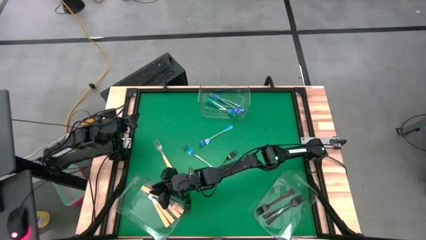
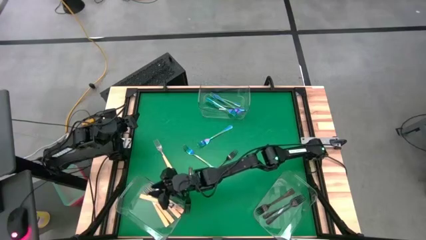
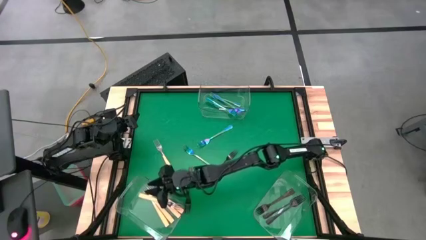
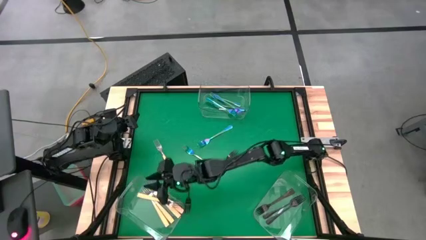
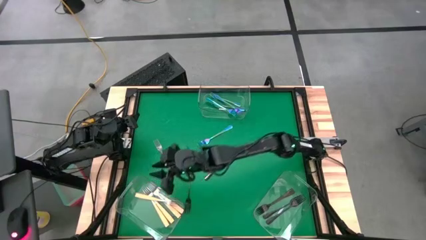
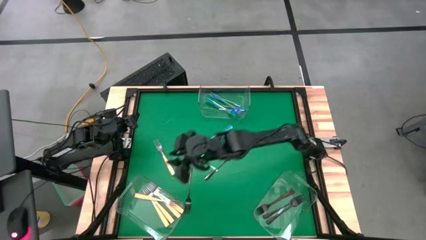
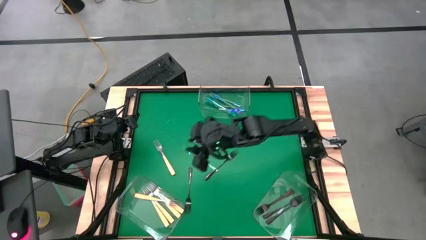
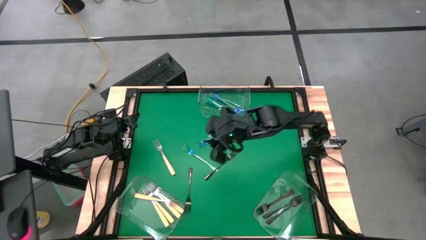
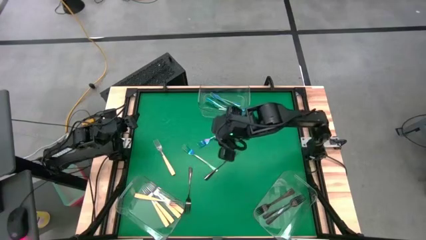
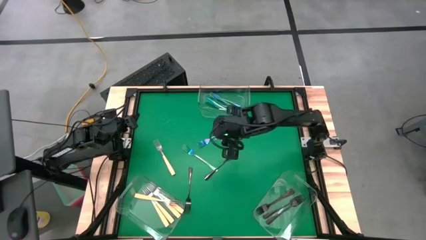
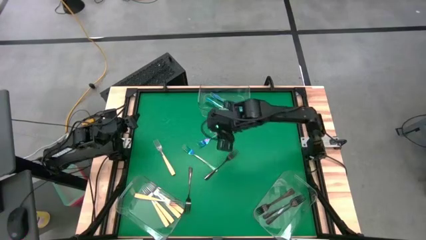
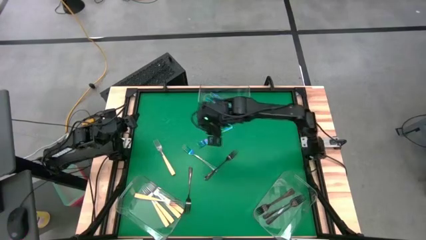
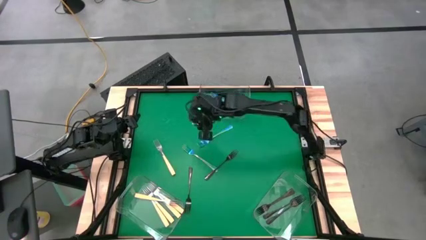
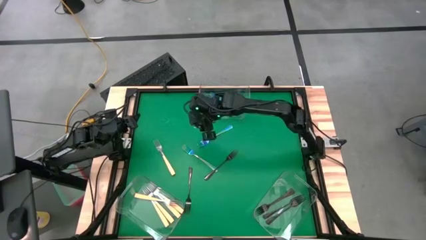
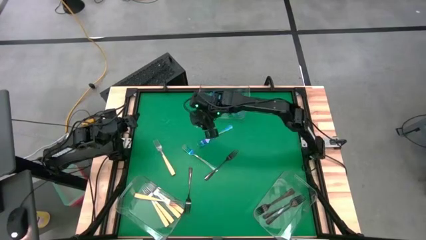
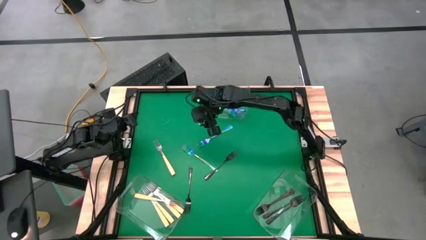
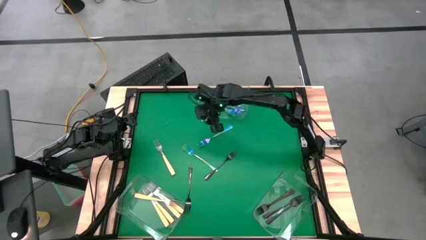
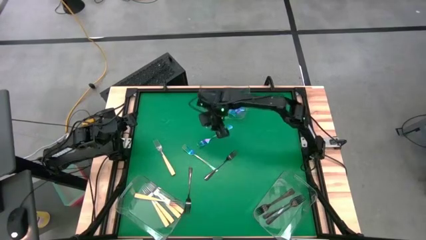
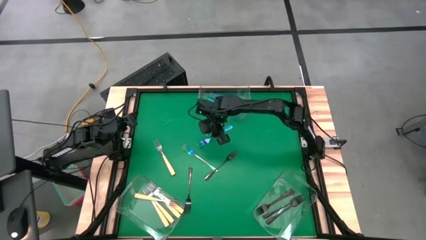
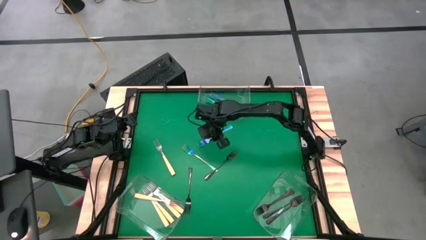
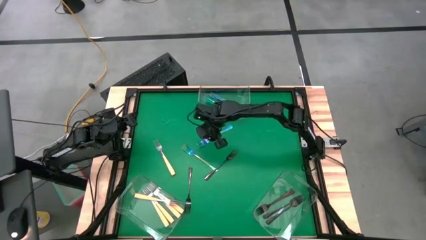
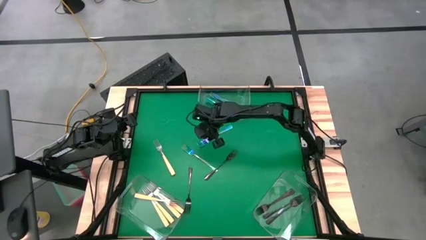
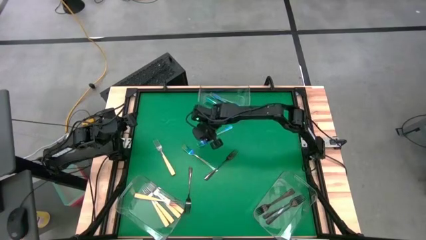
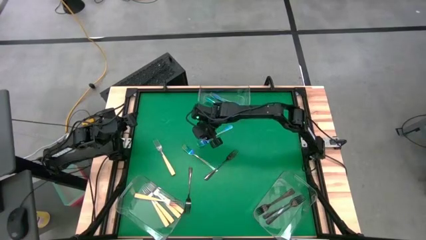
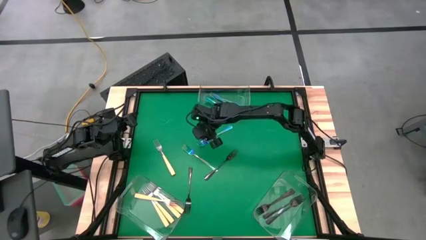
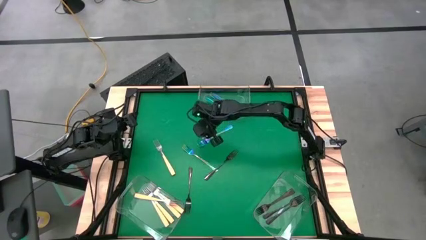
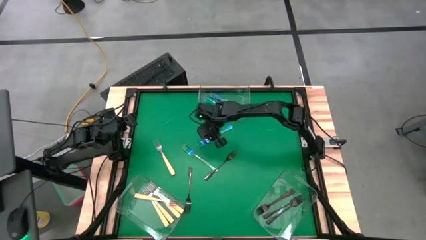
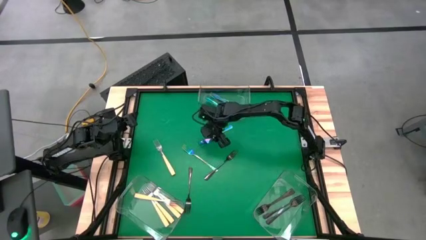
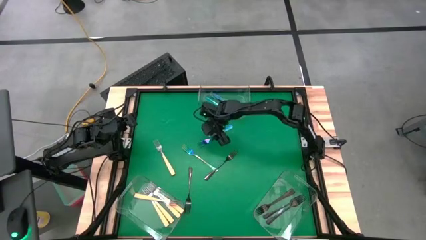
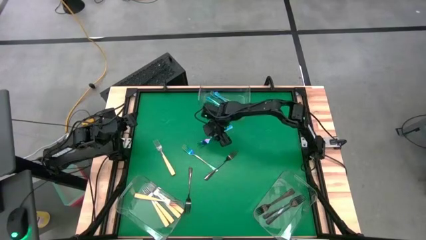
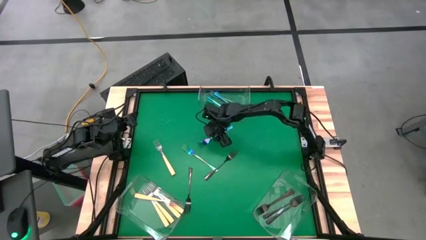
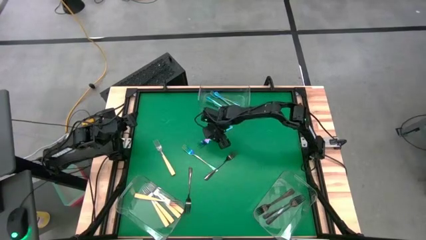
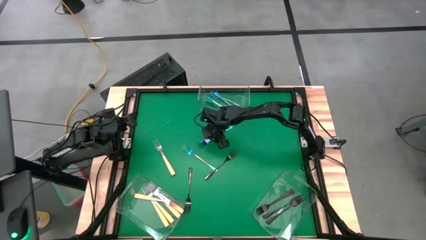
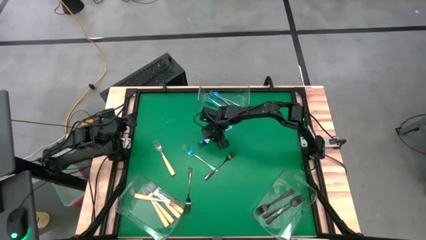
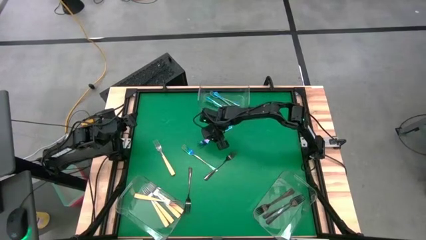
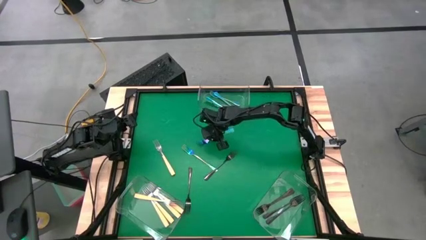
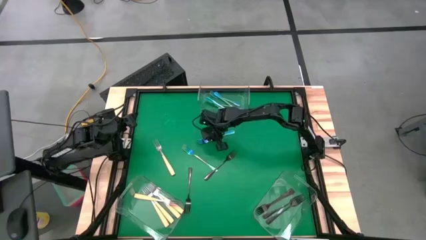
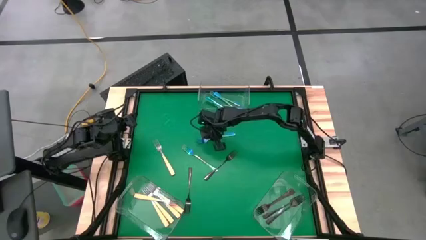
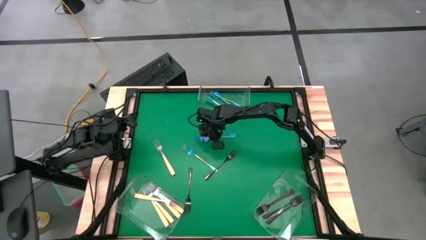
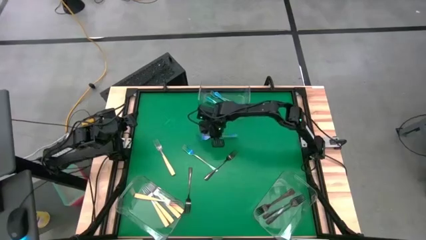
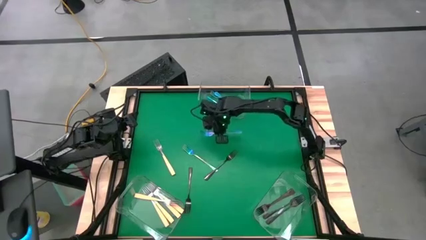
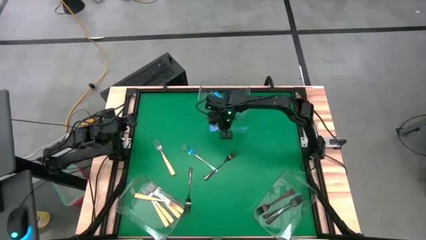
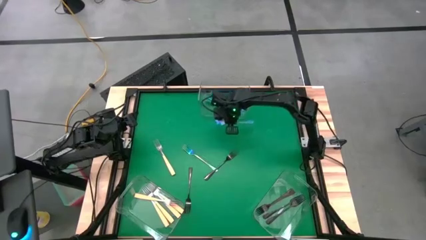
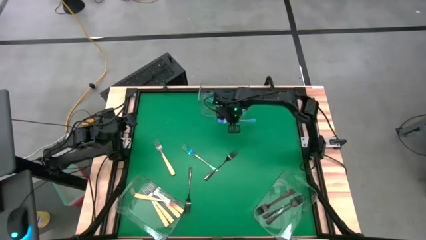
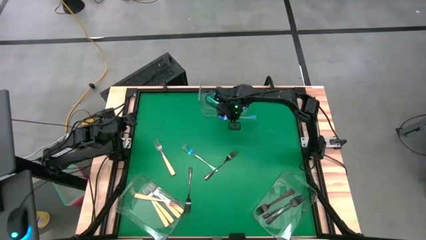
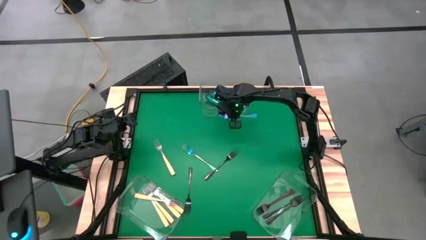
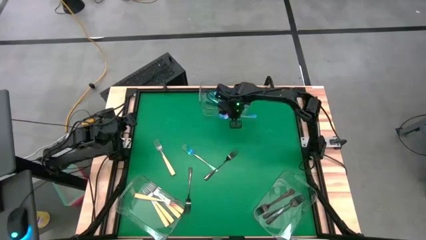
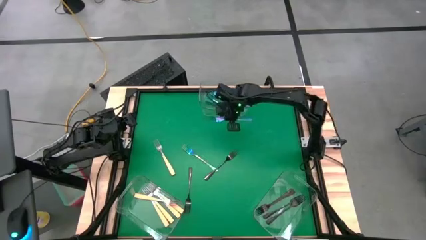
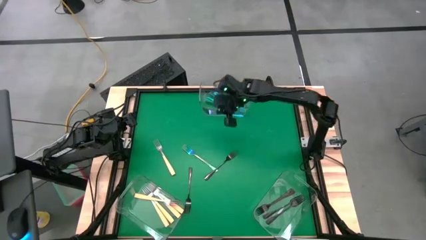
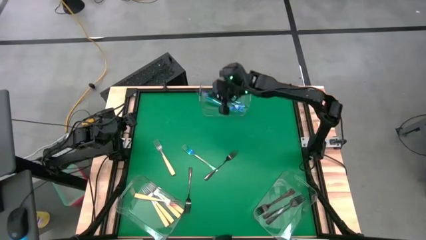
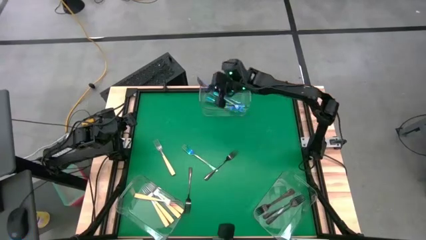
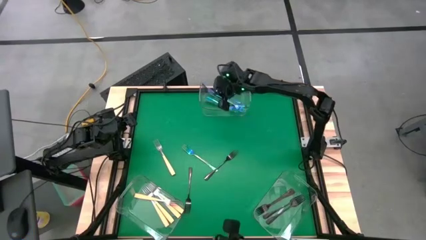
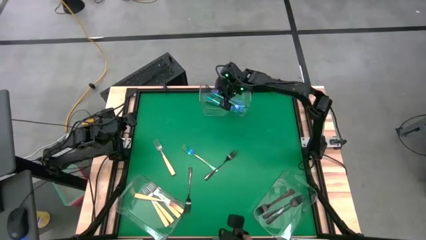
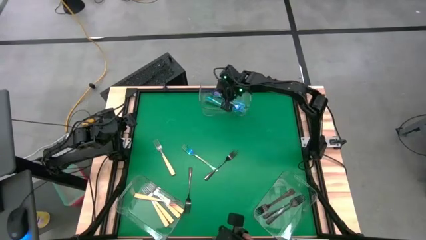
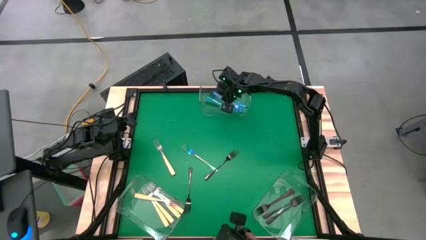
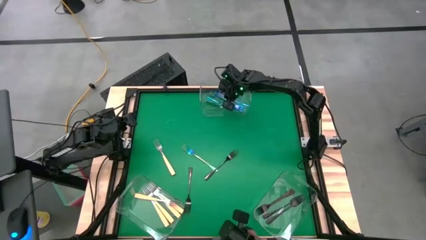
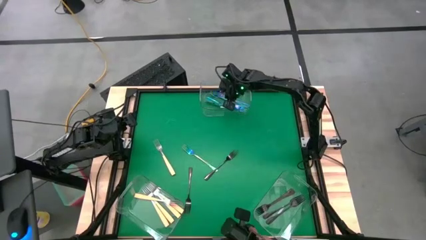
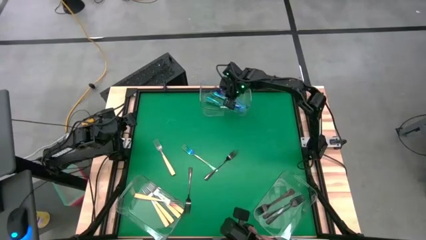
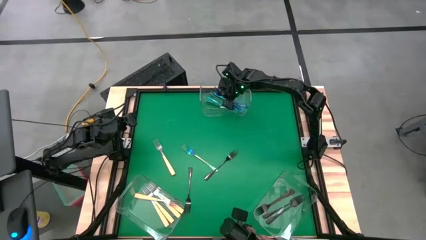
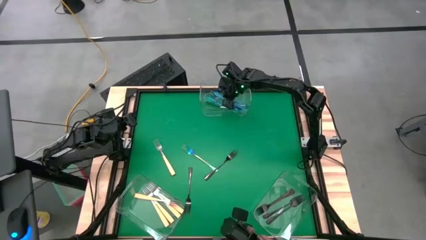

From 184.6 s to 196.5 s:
Task: Sort silverware by color (type)
Put the blue fork into the top transparent bin

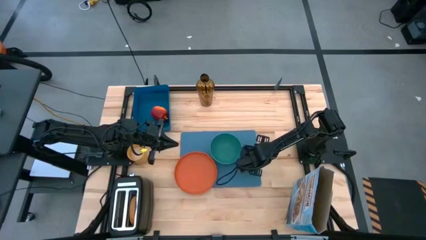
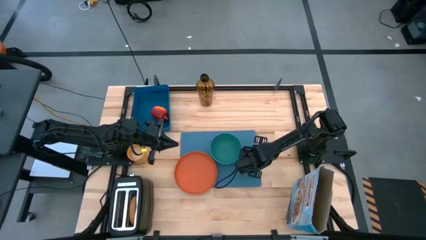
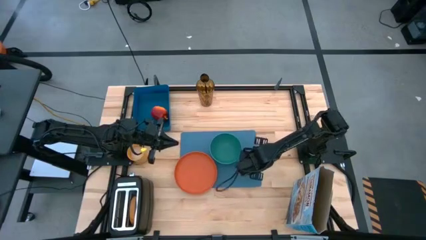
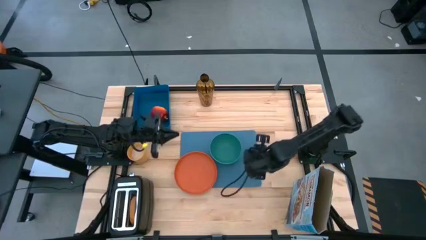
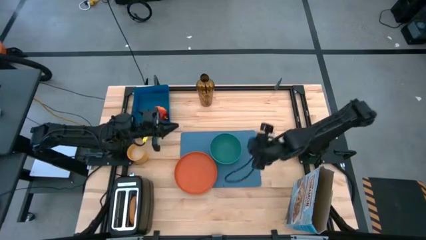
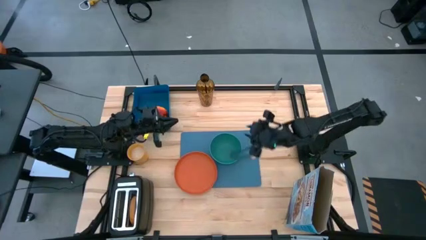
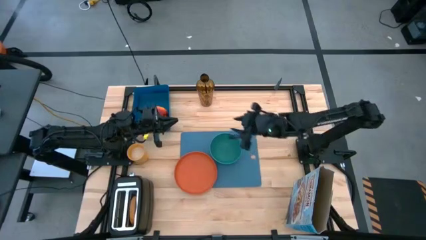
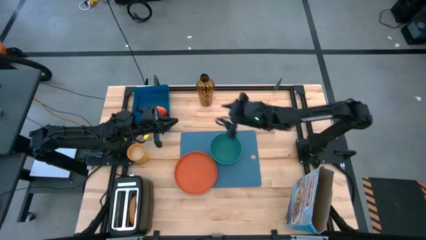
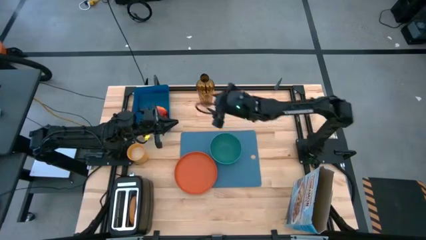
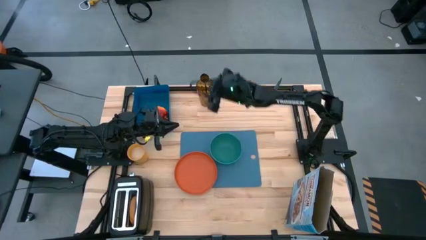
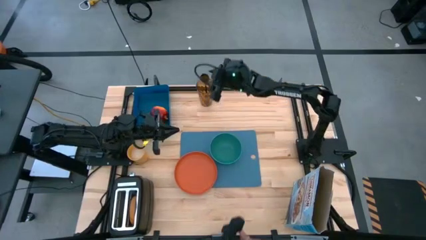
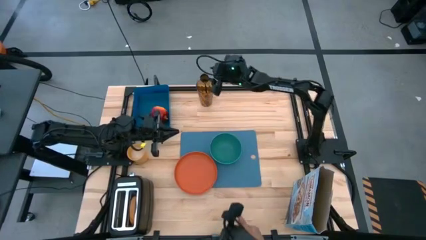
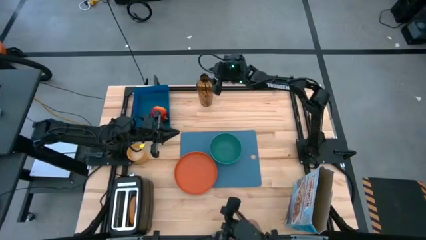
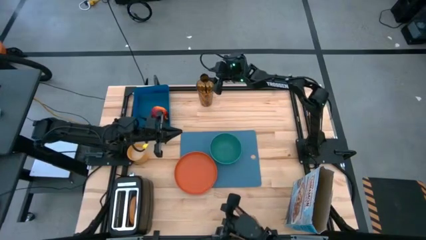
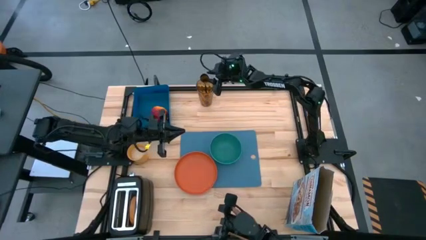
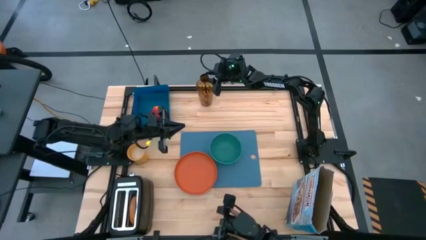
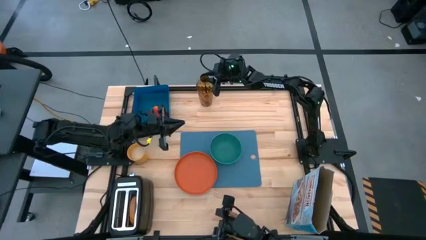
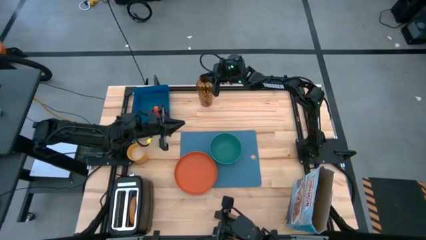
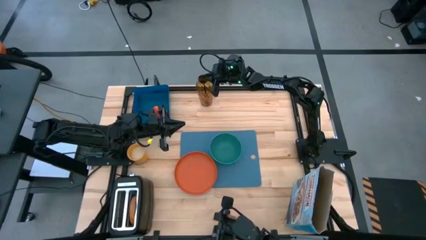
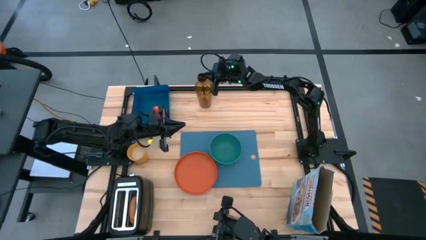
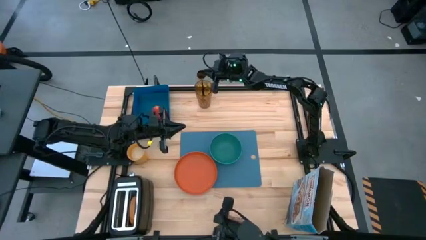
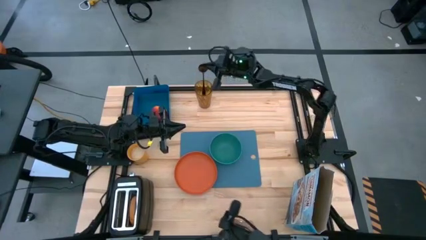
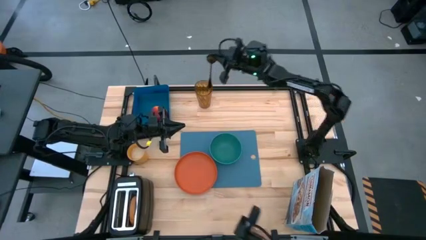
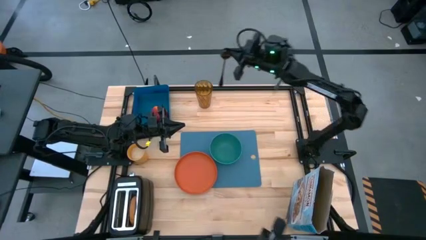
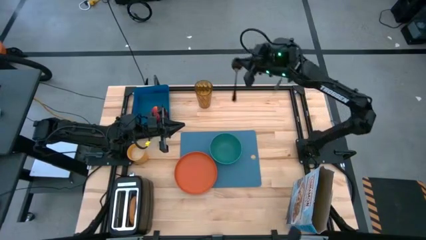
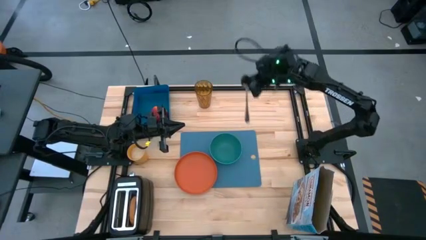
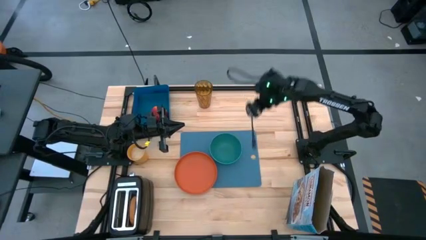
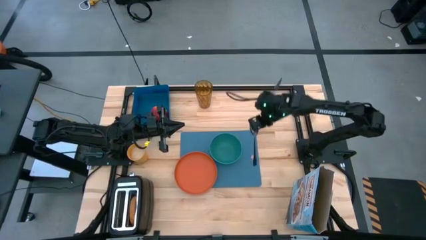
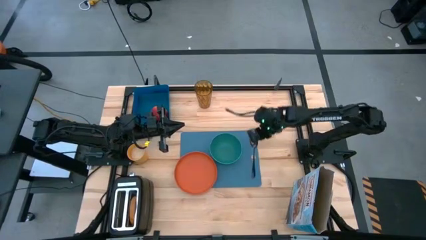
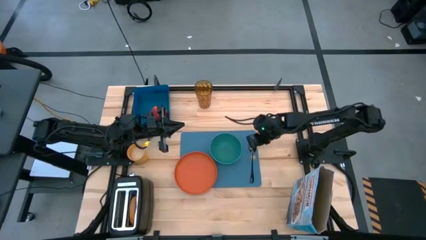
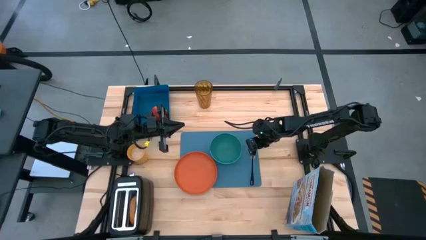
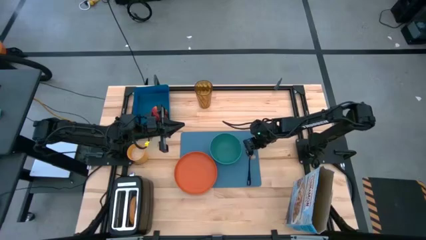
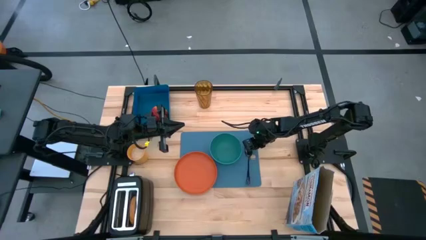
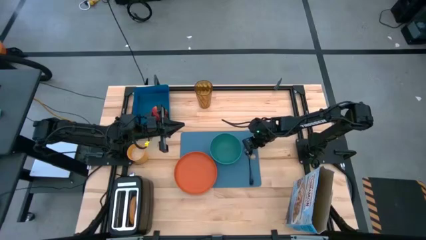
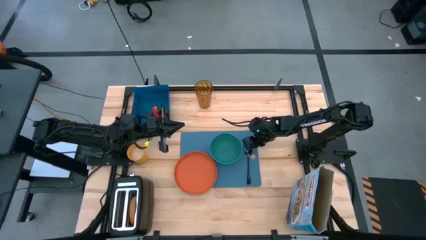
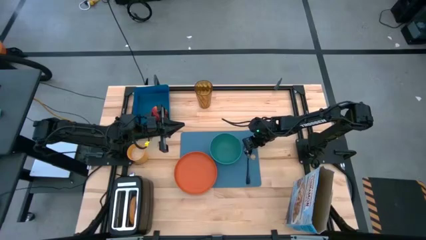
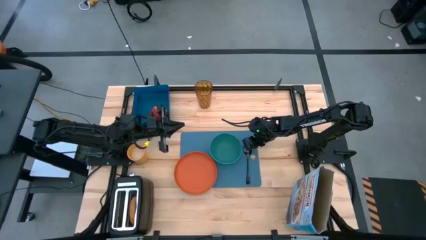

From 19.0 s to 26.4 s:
Task: Arrange a breakfast setting
Put the black spoon on the blue cutting board to the right of the green bowl
